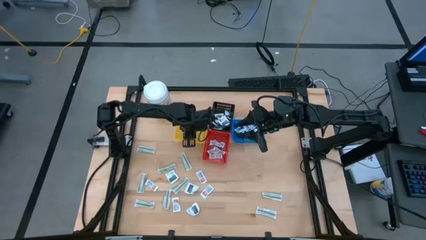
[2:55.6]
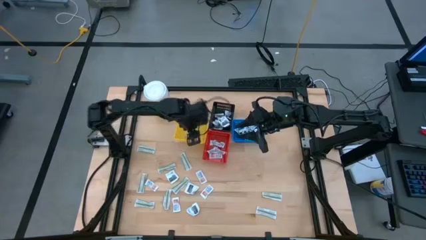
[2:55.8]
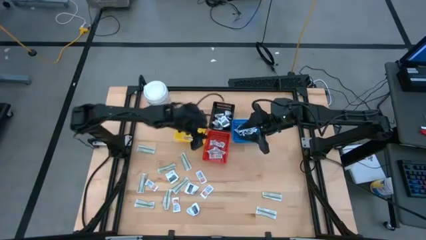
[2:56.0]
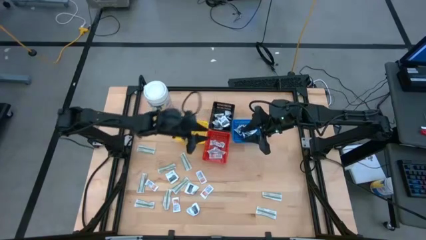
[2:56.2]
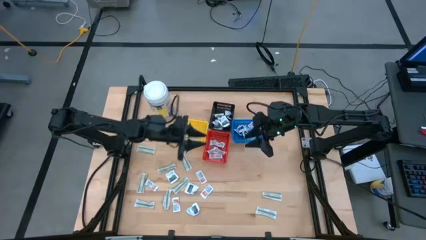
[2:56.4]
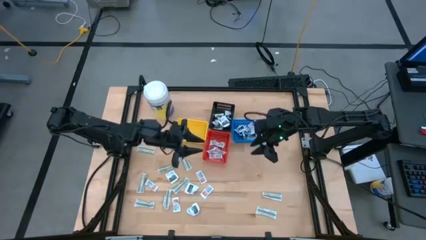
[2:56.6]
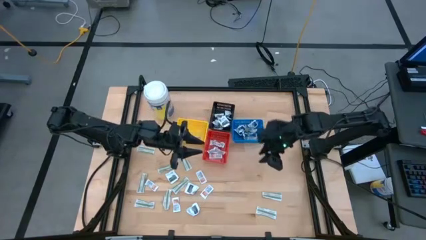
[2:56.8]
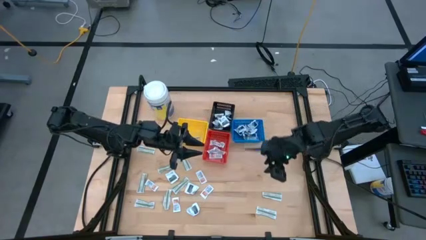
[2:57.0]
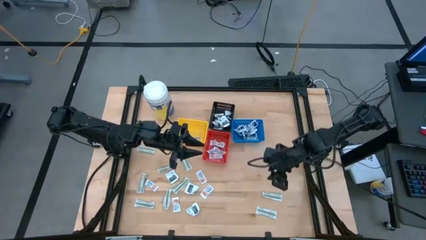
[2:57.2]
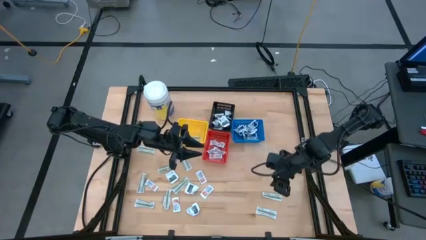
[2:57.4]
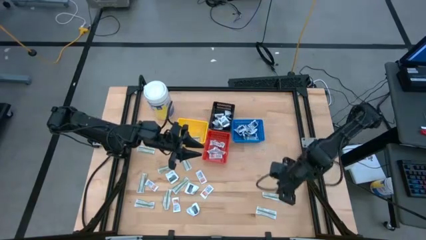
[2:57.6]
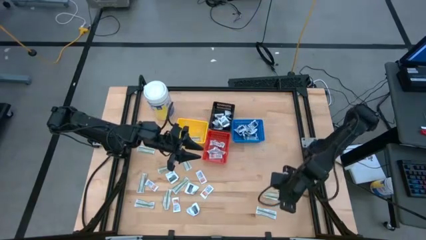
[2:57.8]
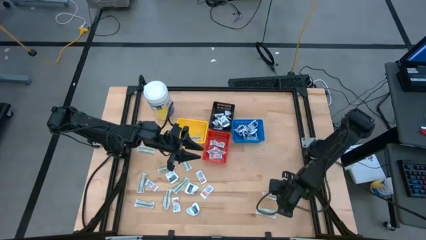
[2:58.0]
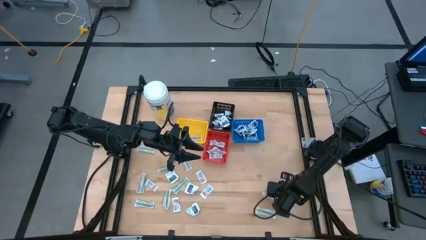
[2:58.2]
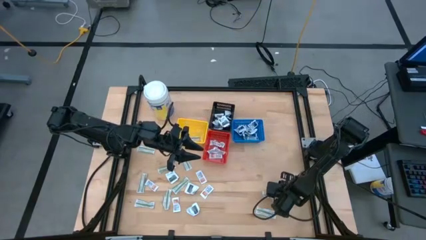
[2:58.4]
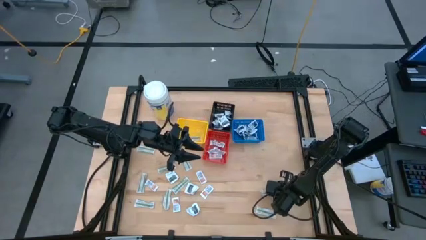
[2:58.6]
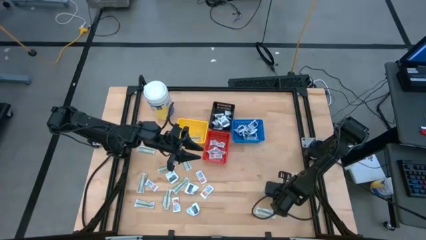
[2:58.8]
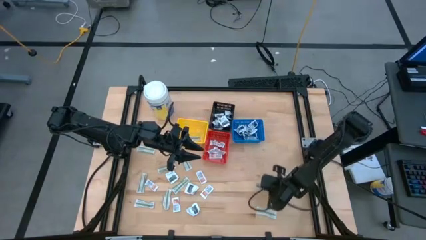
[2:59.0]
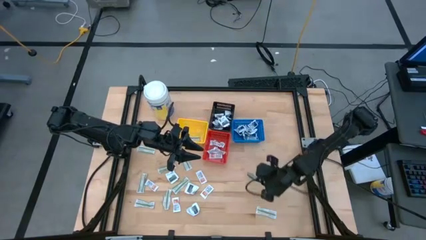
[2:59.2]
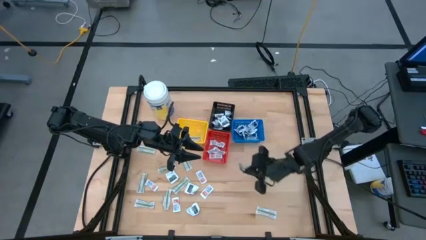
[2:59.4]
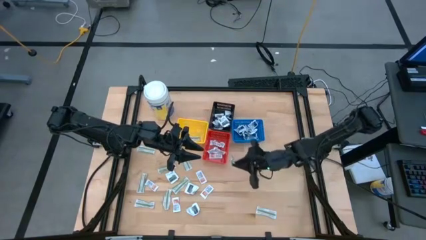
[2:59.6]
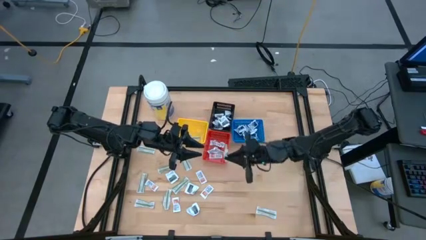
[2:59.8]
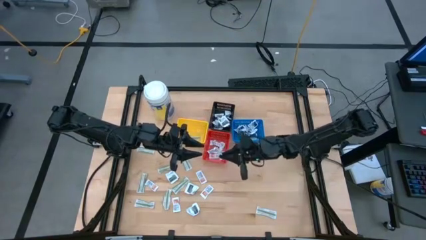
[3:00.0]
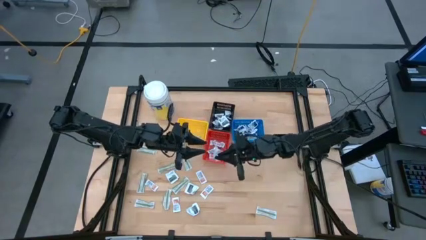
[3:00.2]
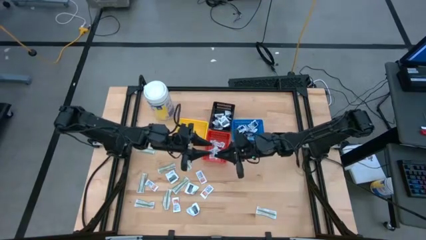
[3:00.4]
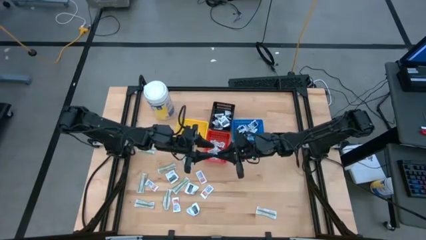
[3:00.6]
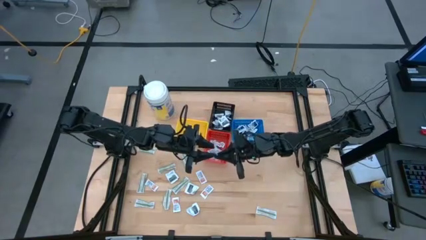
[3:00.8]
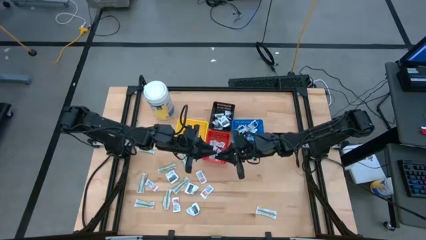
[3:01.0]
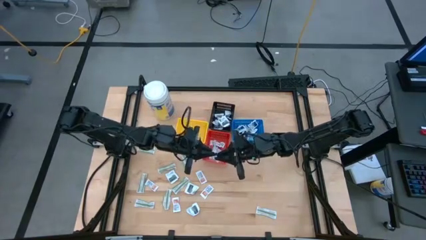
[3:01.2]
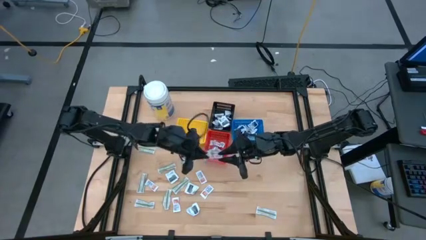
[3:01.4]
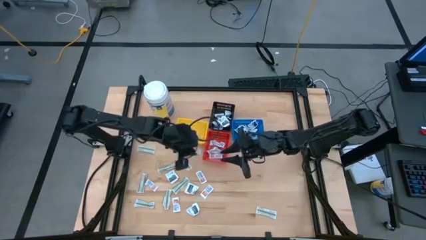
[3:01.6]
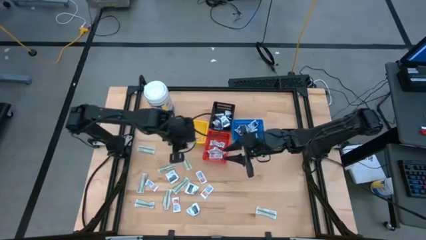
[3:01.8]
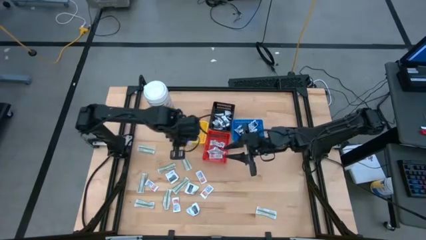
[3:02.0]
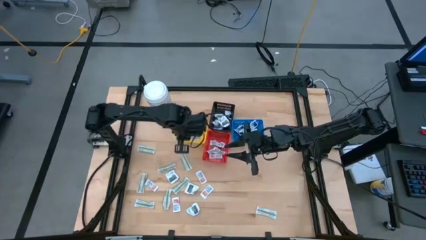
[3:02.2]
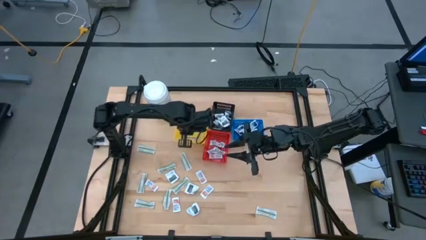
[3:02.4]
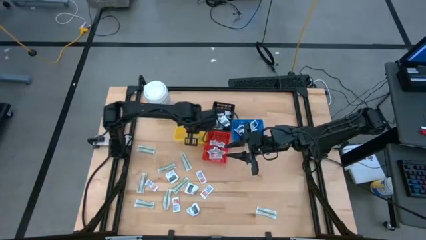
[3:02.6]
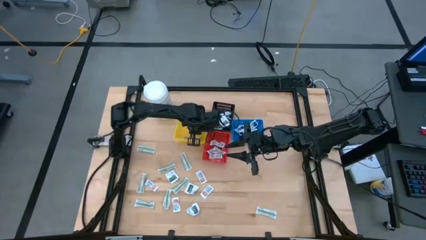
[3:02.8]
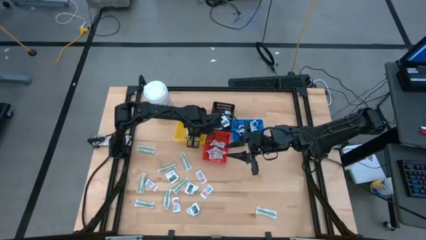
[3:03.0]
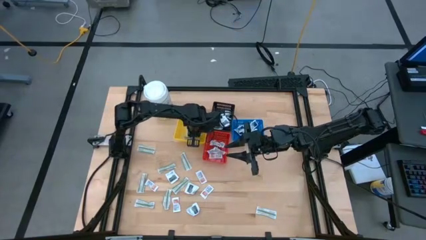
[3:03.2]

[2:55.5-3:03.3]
Task: Pick & Place First Aid Supplies
Put the bandage pack into the yellow bin

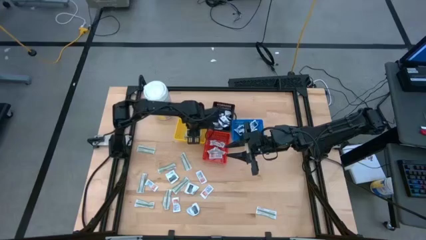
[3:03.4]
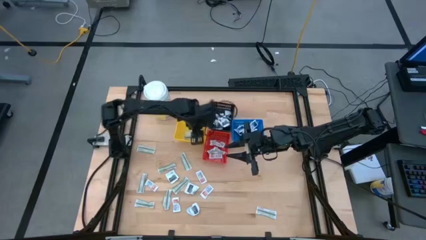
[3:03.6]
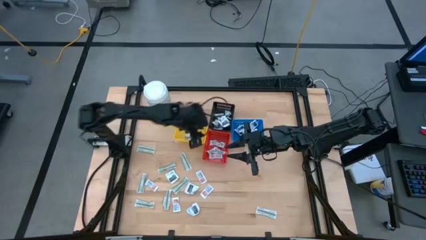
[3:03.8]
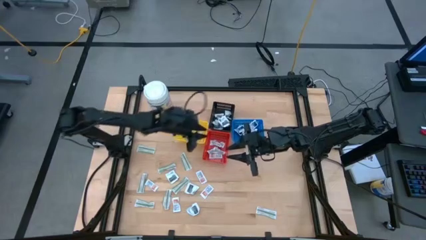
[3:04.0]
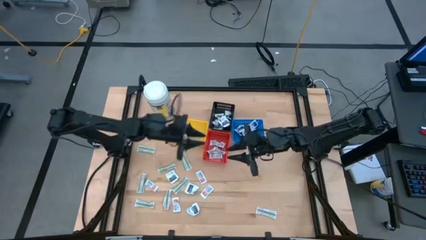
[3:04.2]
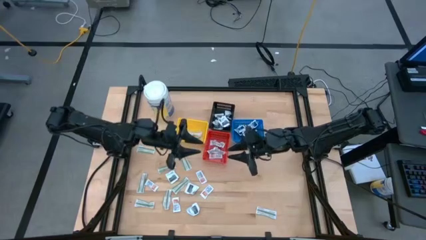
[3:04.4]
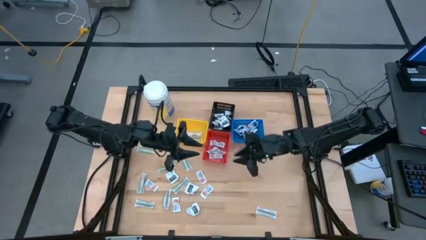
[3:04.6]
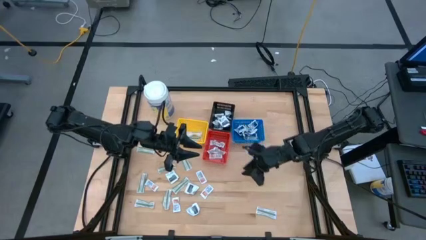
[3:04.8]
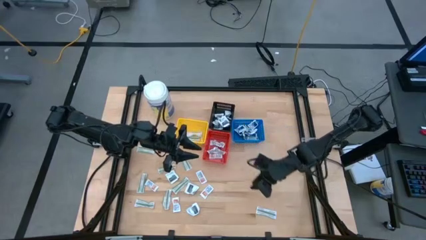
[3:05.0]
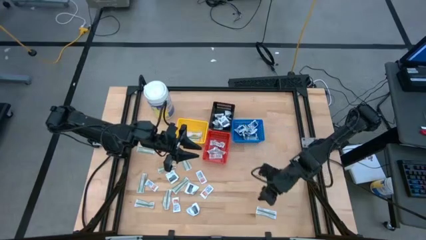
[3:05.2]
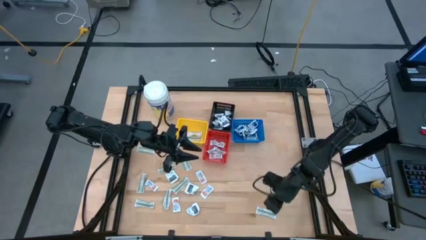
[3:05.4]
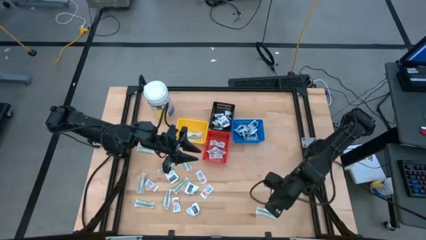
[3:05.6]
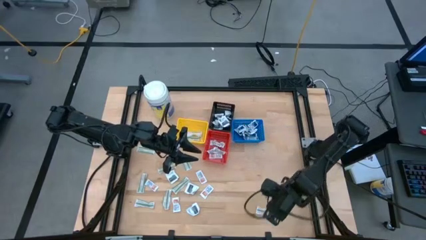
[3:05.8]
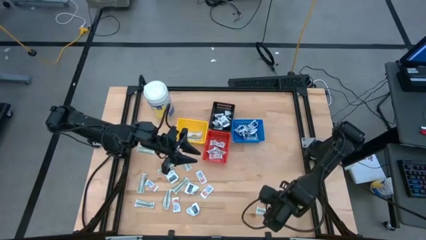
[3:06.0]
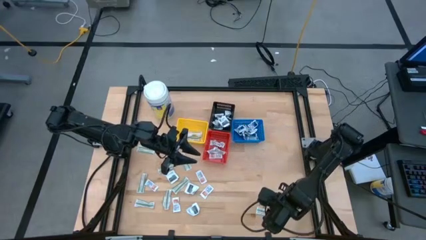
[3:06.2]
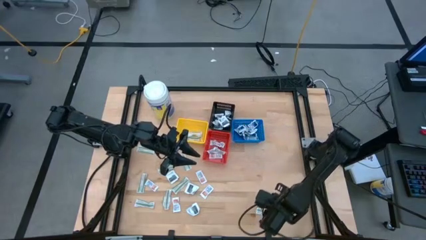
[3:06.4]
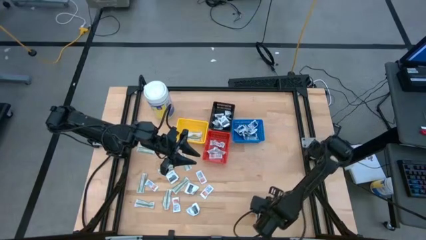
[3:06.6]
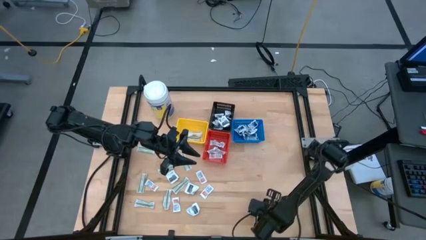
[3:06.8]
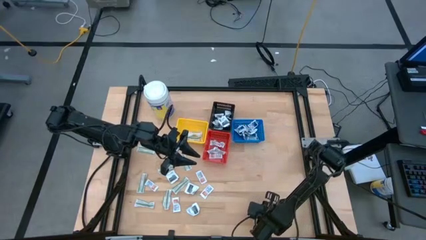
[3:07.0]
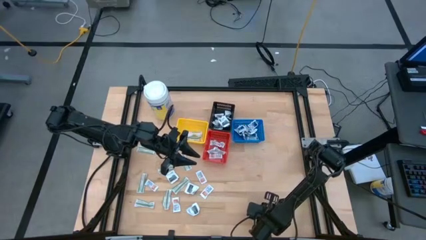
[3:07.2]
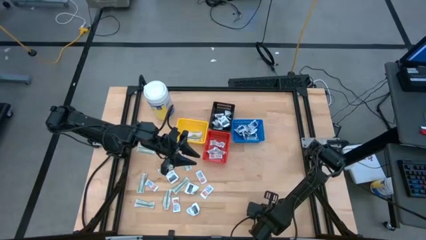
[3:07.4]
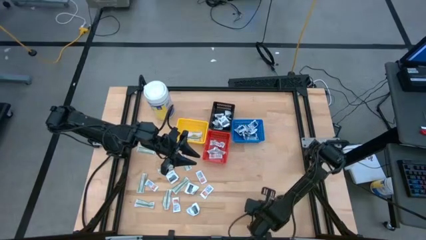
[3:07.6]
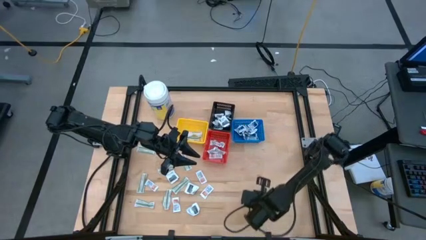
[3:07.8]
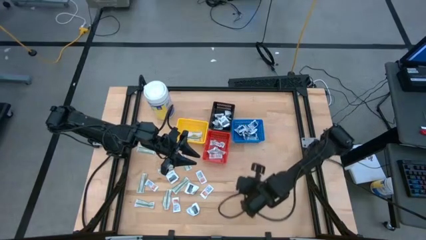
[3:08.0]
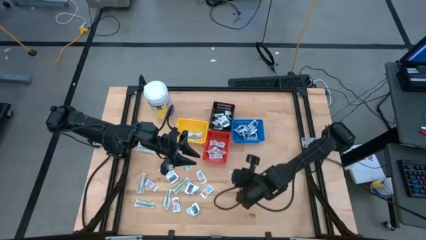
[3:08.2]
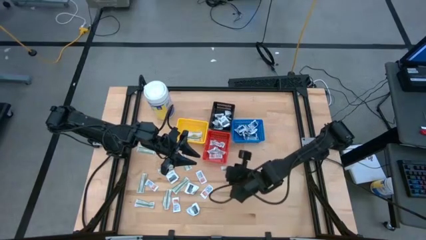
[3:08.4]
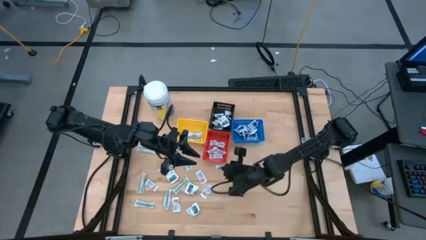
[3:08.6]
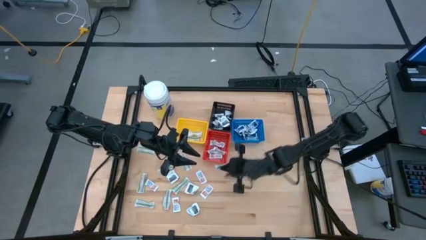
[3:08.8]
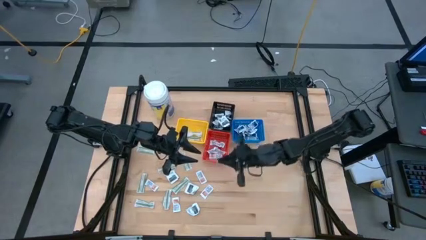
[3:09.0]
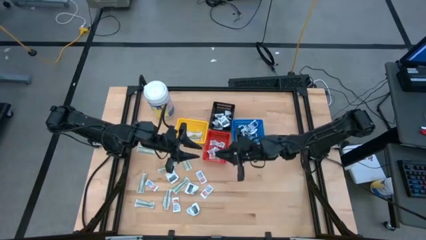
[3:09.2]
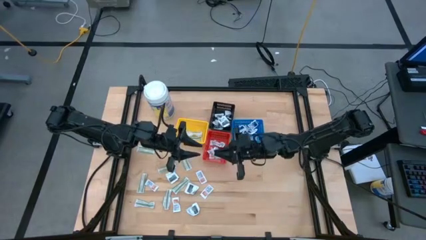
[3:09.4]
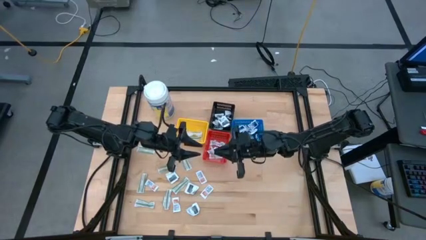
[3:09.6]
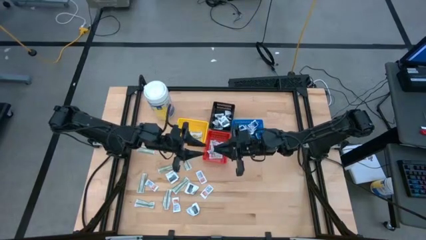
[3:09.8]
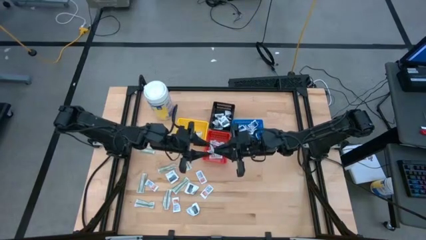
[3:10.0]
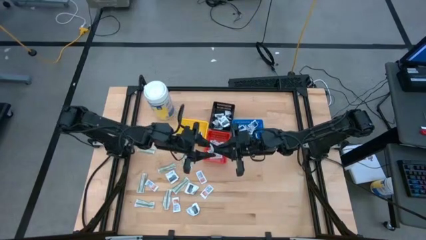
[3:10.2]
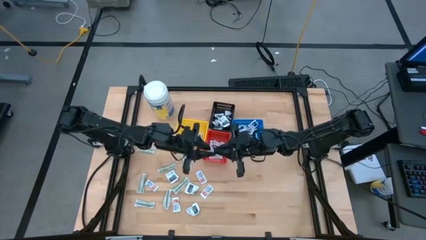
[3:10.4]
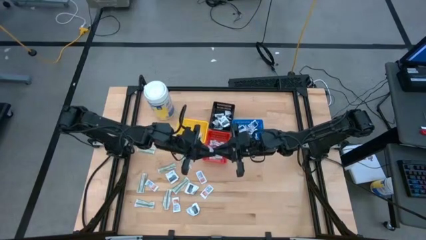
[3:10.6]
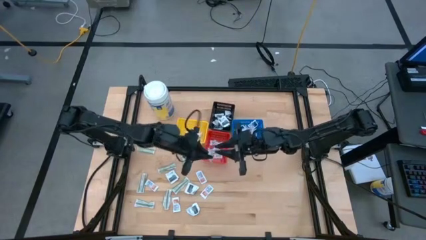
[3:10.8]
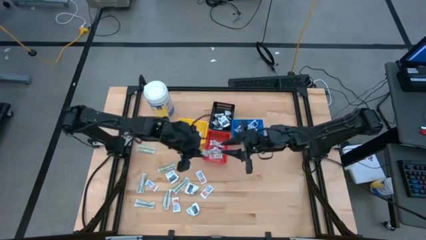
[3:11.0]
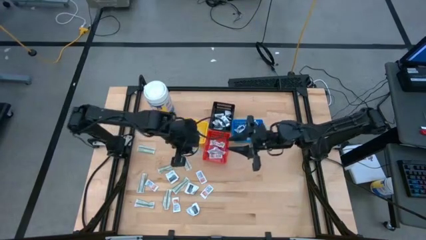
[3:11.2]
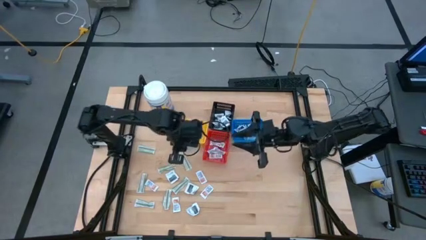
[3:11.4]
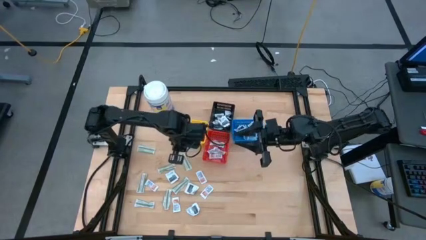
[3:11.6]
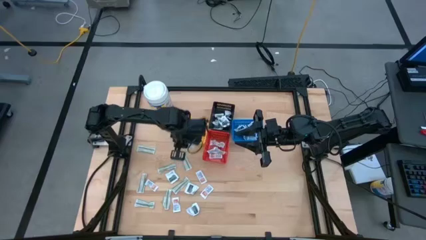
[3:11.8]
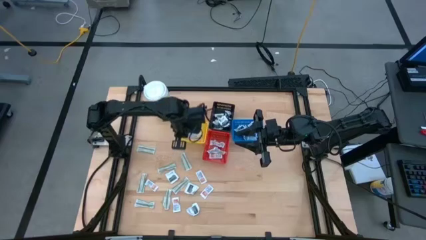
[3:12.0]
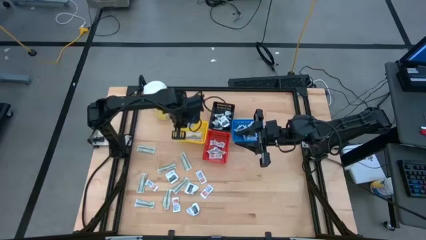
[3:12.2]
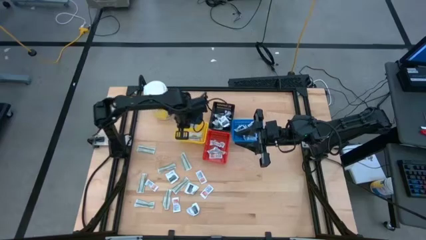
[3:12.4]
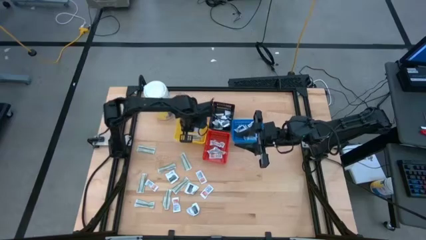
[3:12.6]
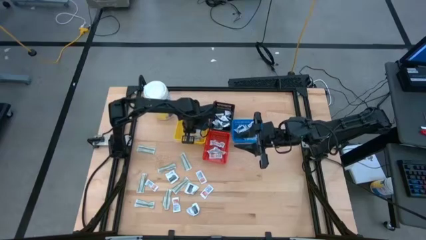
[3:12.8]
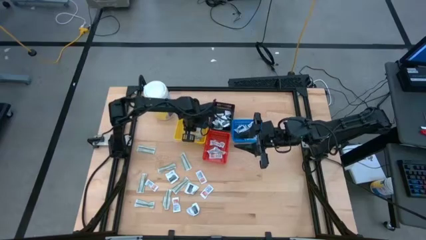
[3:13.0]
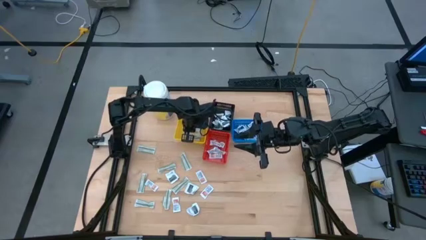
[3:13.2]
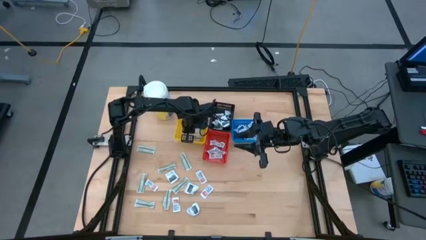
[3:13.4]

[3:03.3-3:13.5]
Put the bandage pack into the yellow bin
